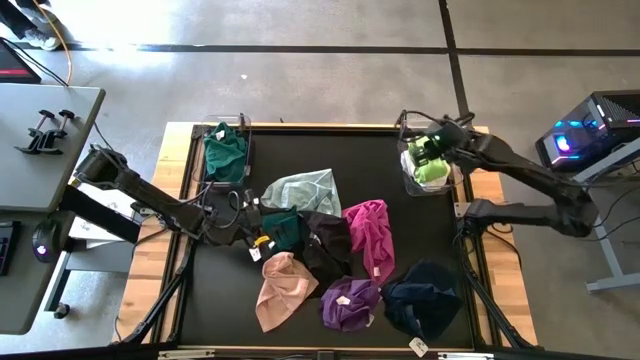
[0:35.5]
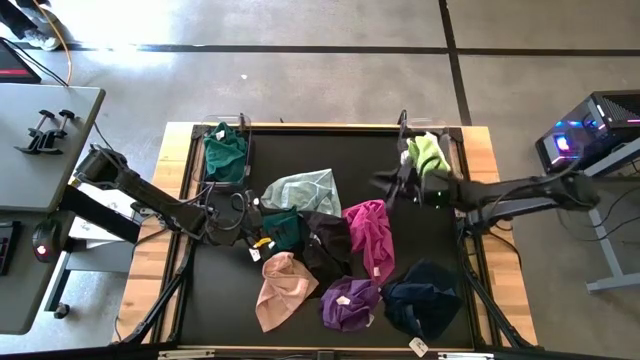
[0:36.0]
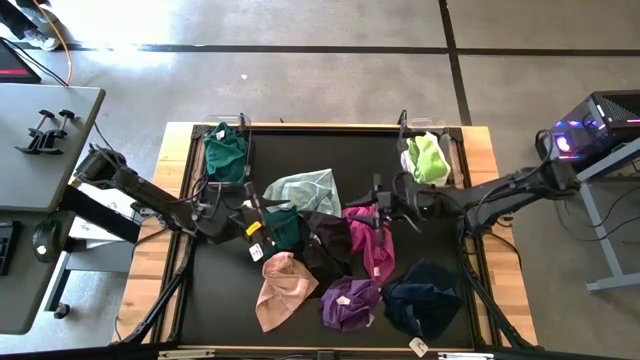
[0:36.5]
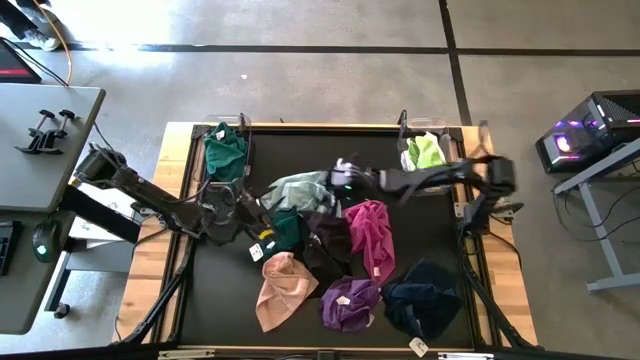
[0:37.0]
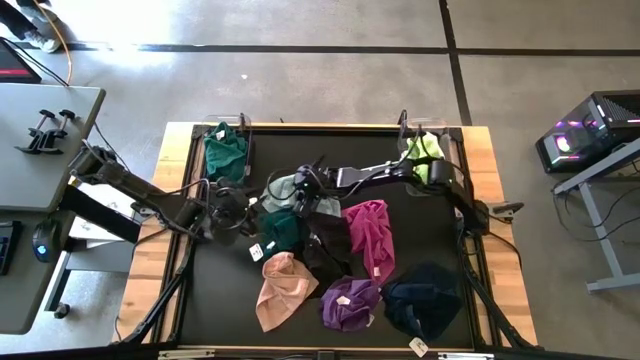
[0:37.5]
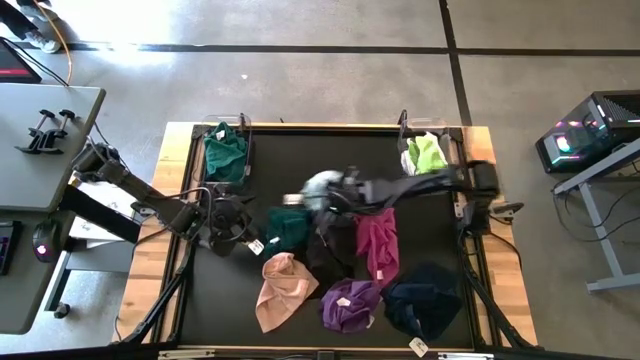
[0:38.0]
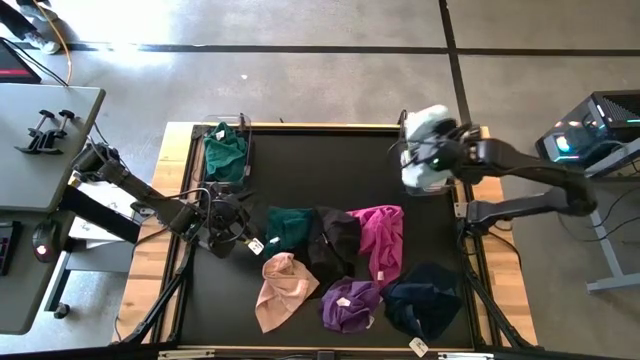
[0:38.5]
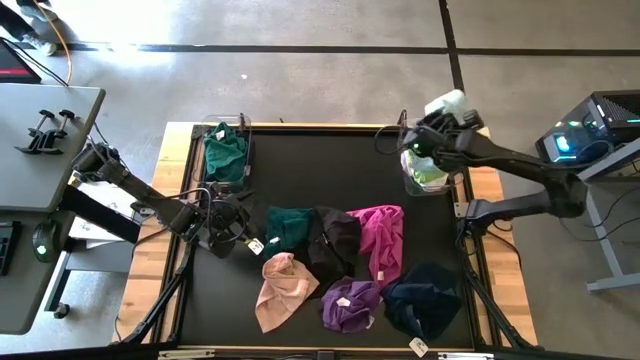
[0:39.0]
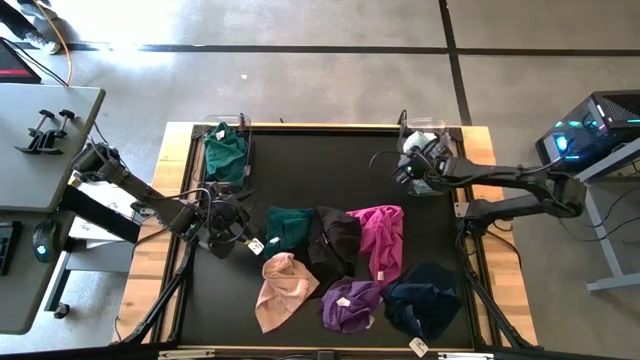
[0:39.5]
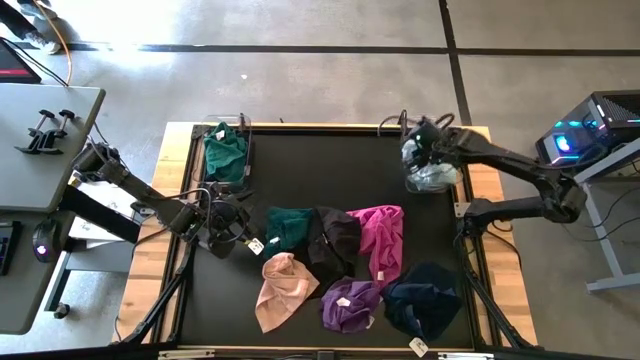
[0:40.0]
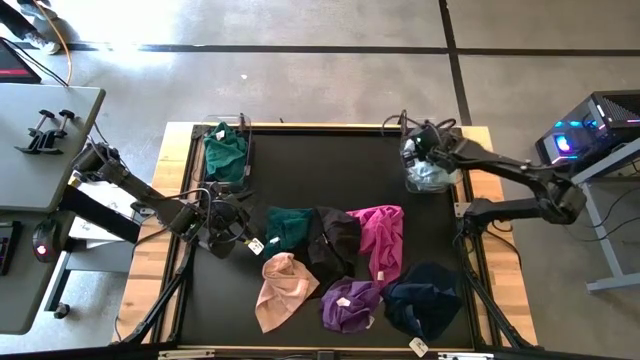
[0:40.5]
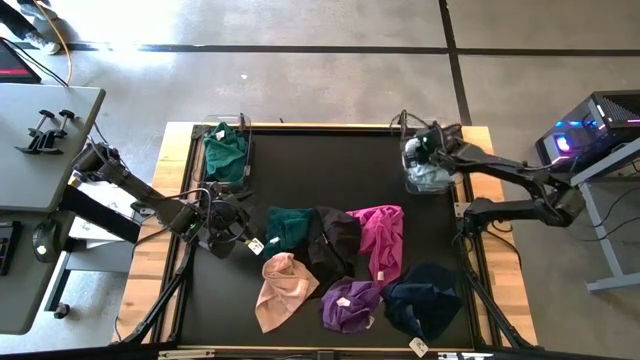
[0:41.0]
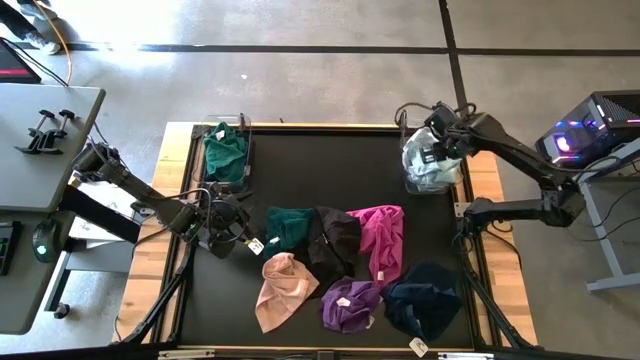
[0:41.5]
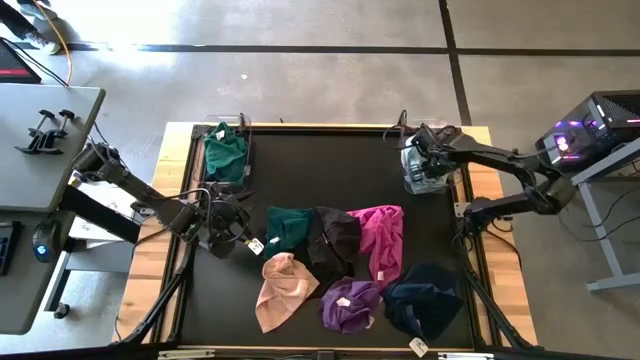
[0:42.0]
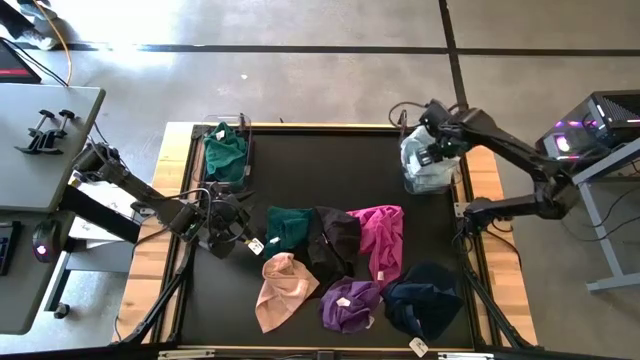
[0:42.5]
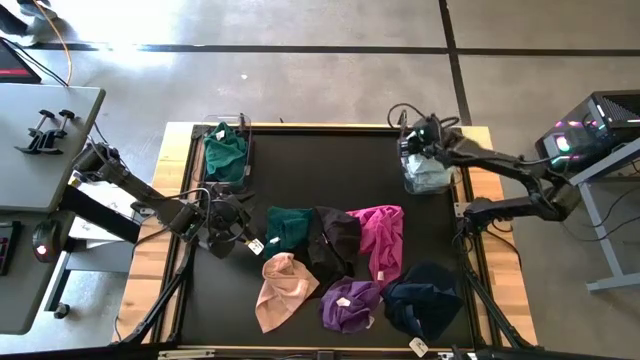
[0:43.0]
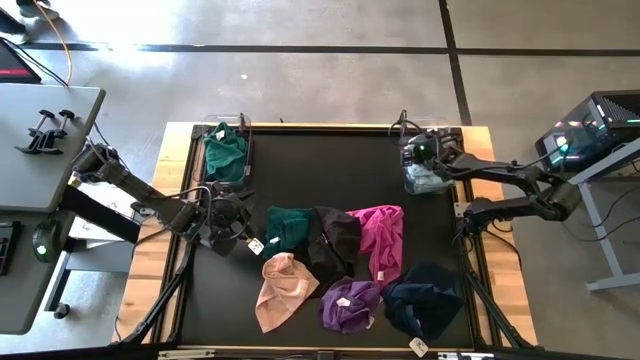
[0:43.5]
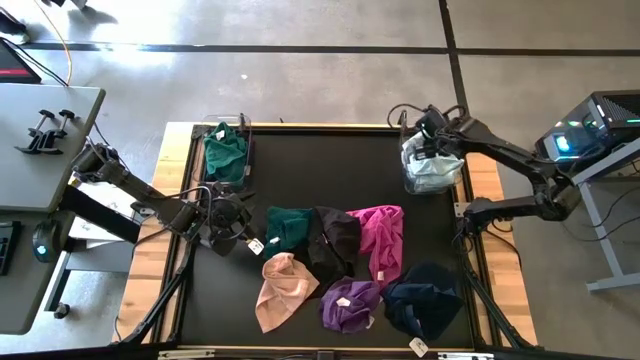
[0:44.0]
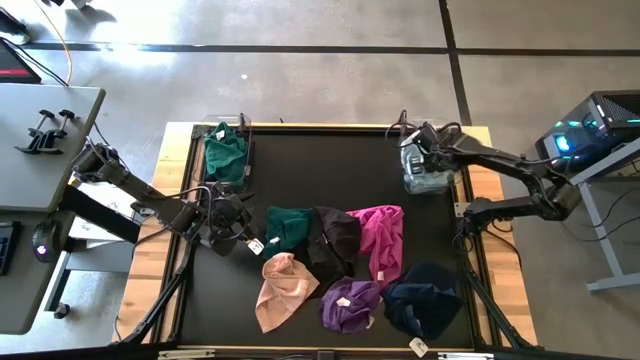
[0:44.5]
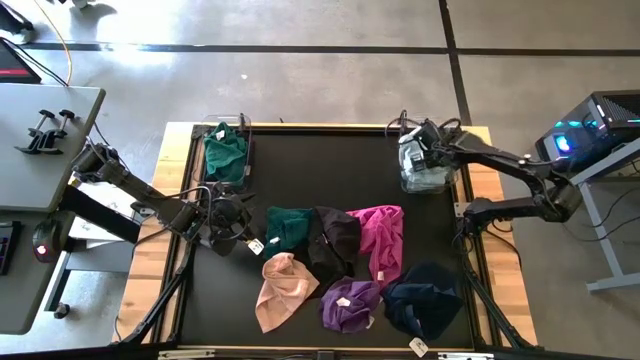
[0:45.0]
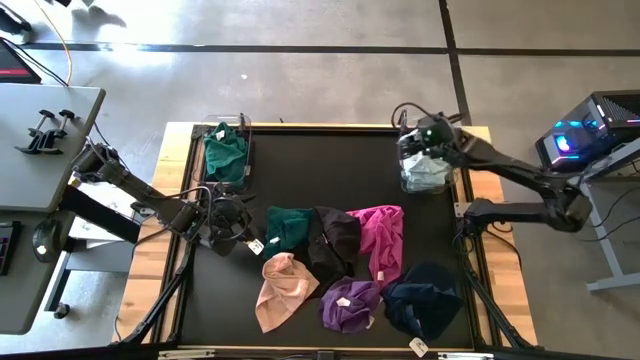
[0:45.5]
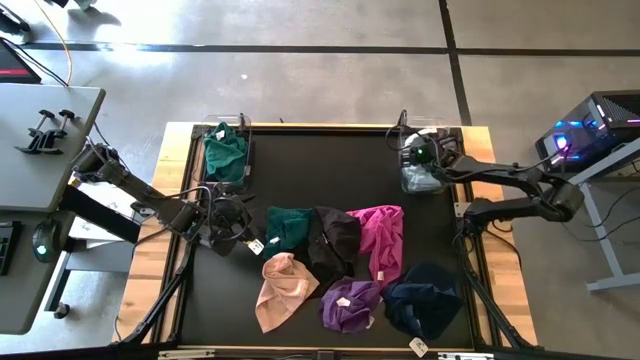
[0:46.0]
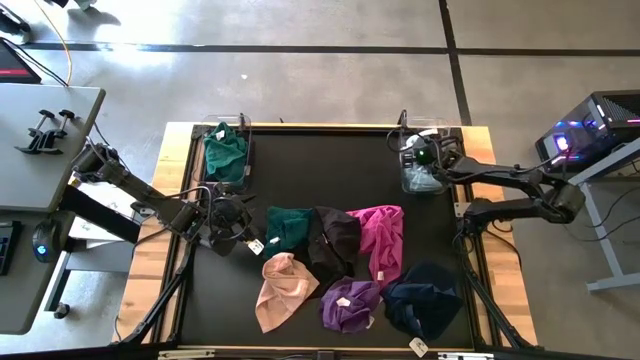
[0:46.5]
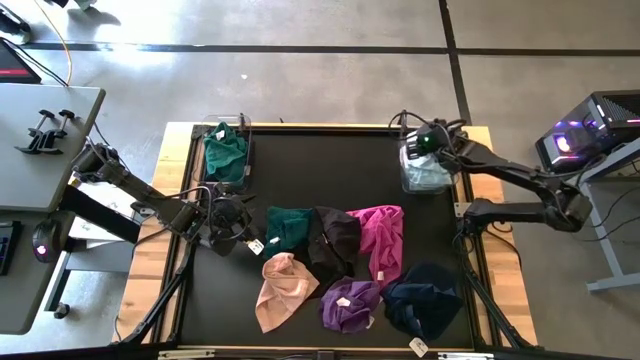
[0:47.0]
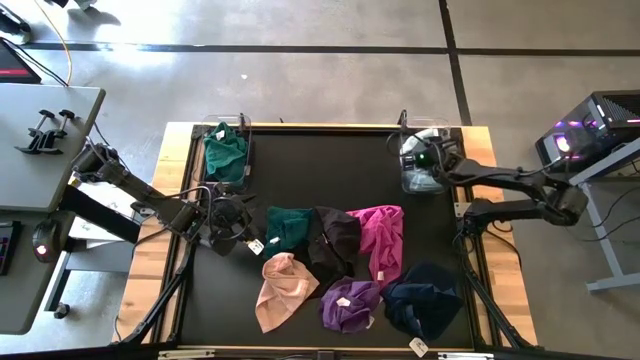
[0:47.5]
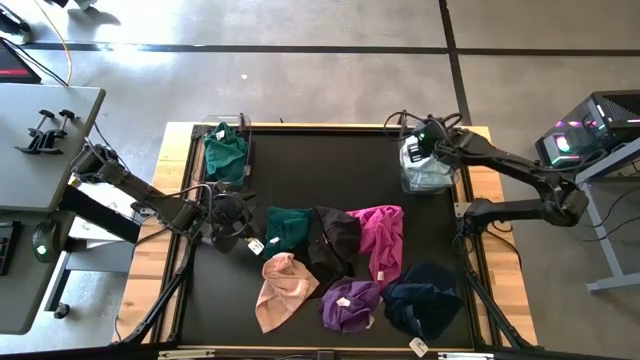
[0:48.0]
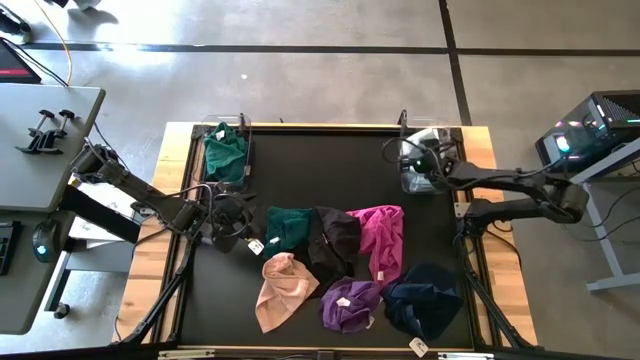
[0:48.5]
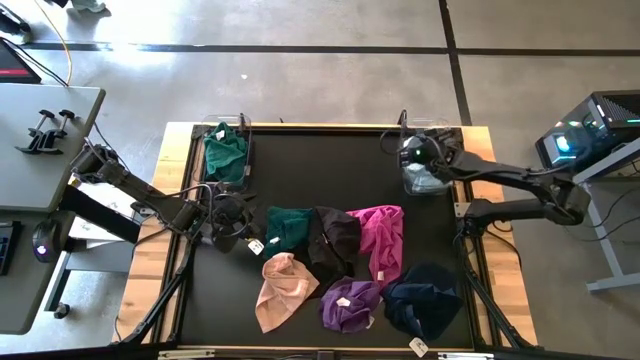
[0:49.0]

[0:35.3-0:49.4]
Task: Sort towels by color in basket
Put the light blue microfiber cloth into the right transparent bin

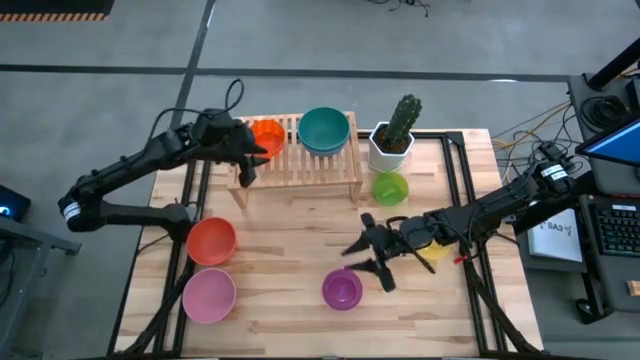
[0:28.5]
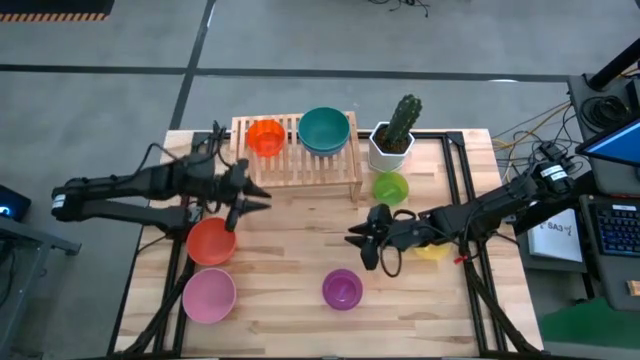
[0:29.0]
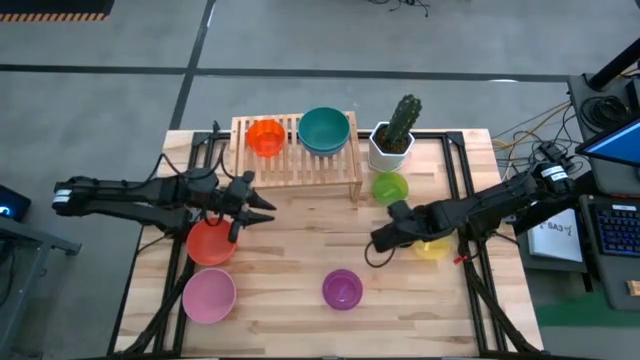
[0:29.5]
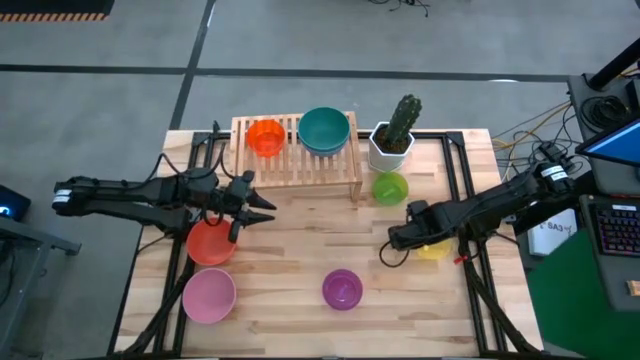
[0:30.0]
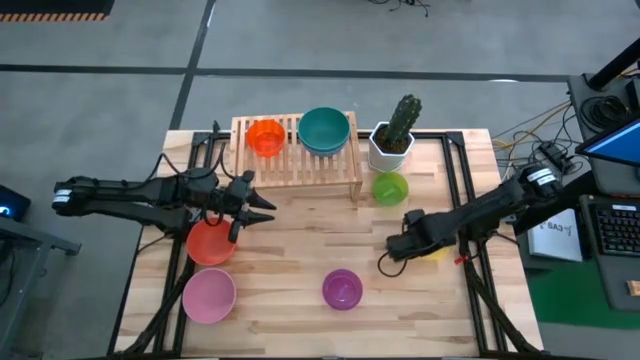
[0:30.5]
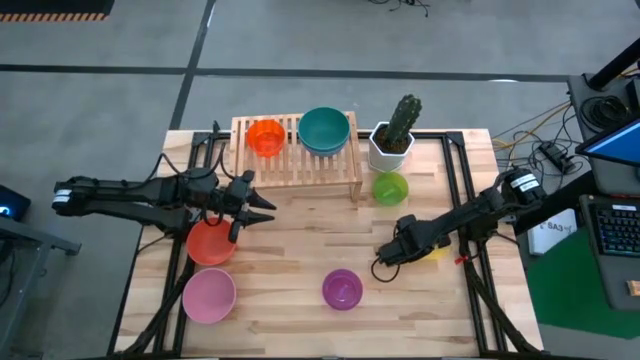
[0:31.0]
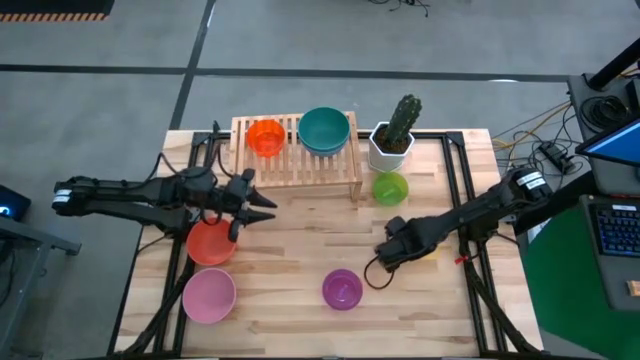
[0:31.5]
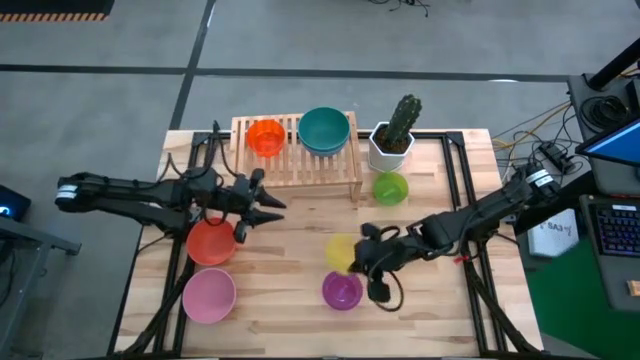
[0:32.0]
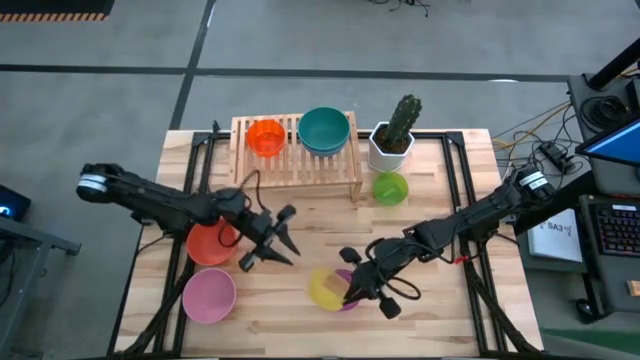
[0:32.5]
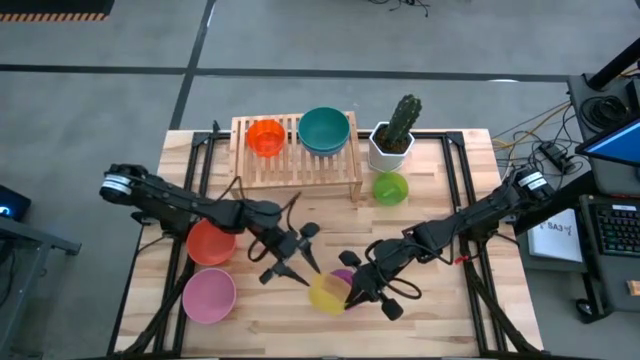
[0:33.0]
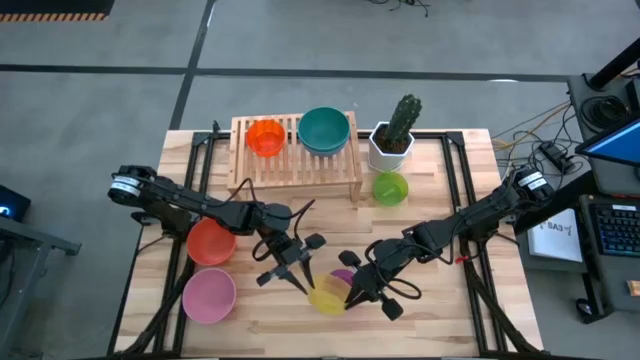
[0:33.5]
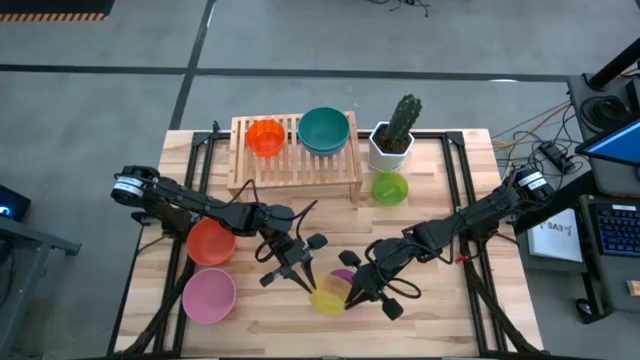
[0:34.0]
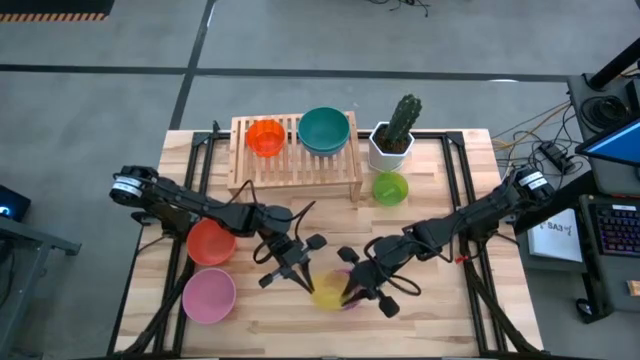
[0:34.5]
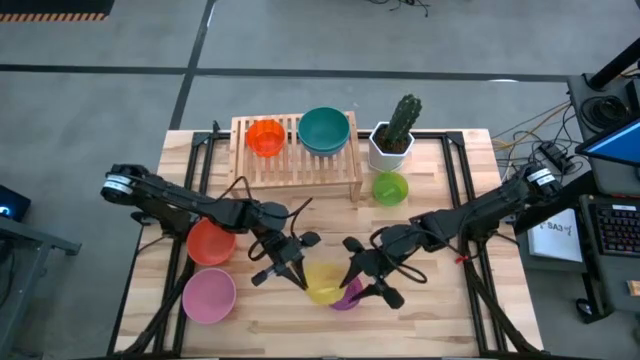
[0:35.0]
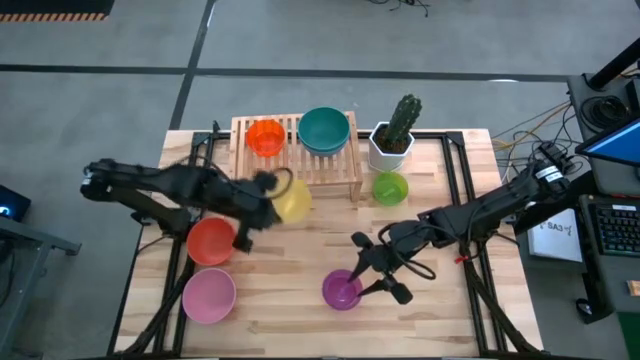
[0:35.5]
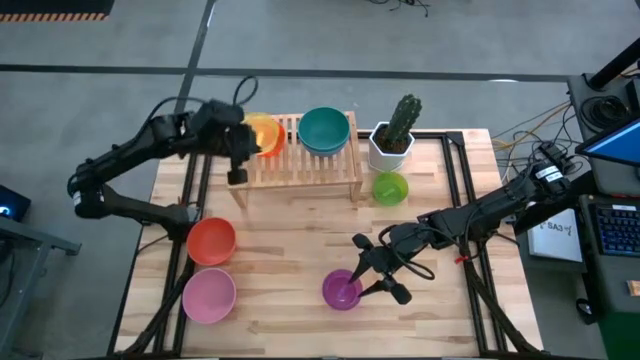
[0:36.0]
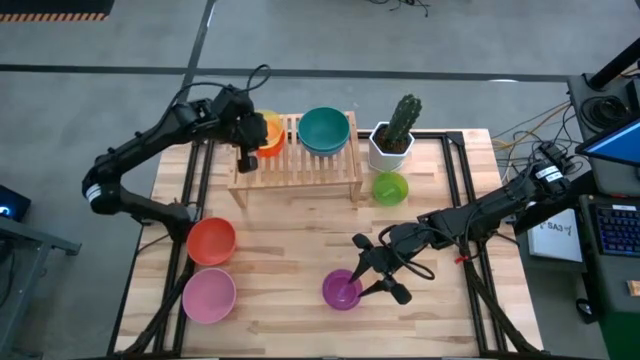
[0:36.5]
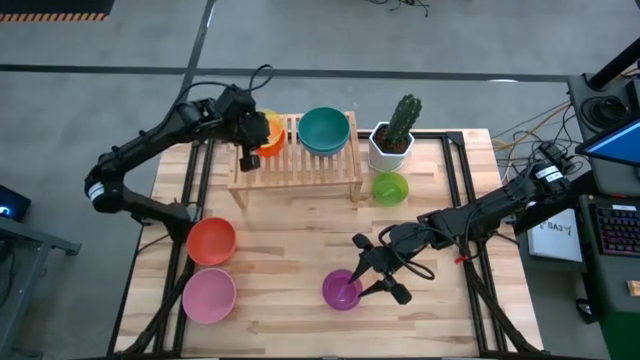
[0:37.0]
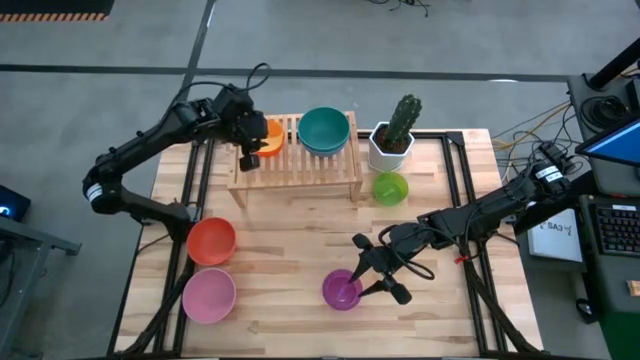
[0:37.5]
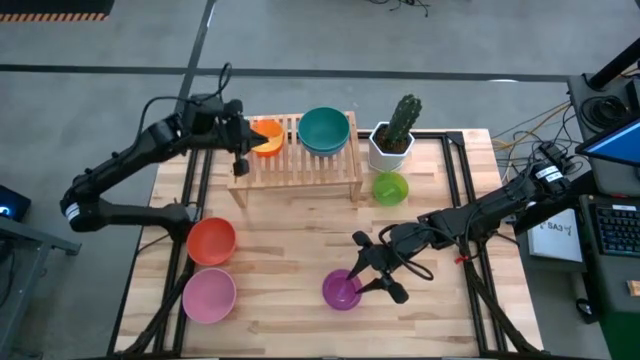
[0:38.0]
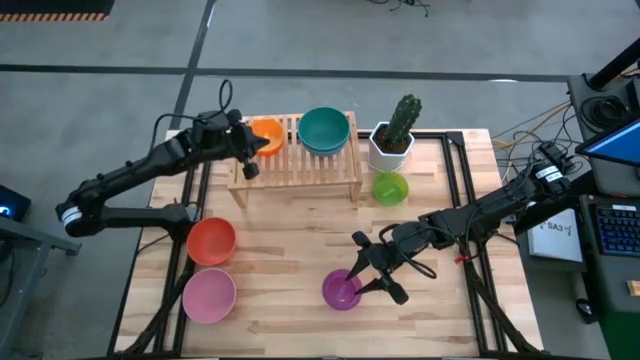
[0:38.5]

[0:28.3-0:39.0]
Task: Place and stack bowls onto a shelf
Stack the yellow bowl on top of the orange bowl on the shelf
